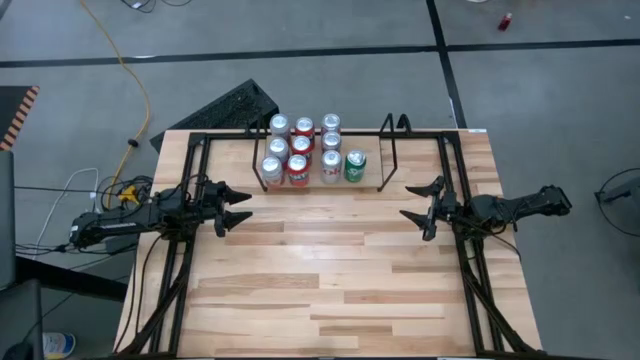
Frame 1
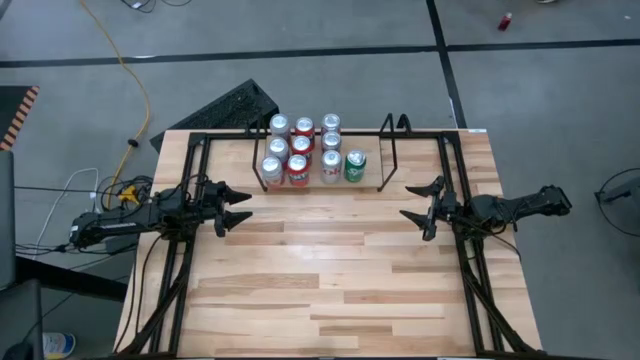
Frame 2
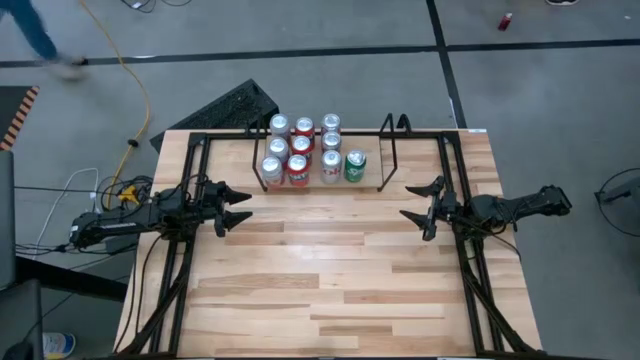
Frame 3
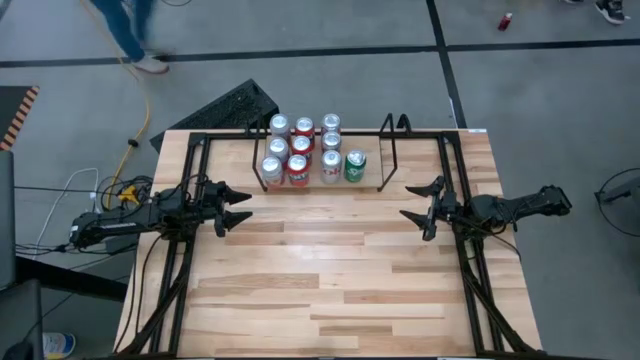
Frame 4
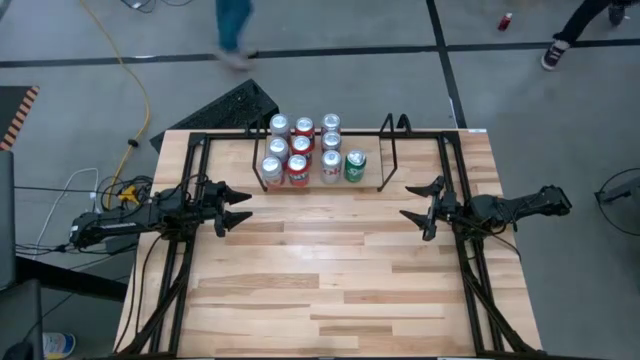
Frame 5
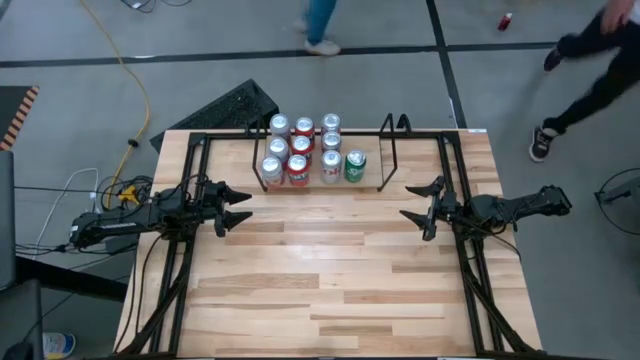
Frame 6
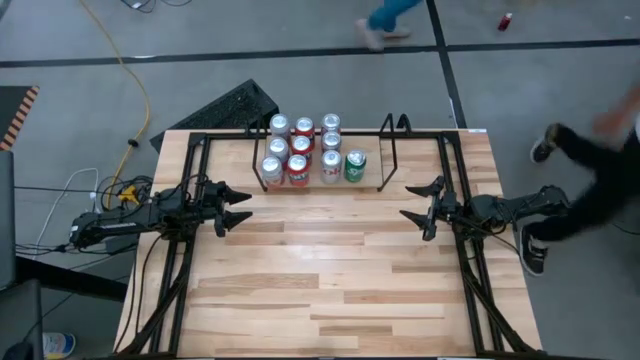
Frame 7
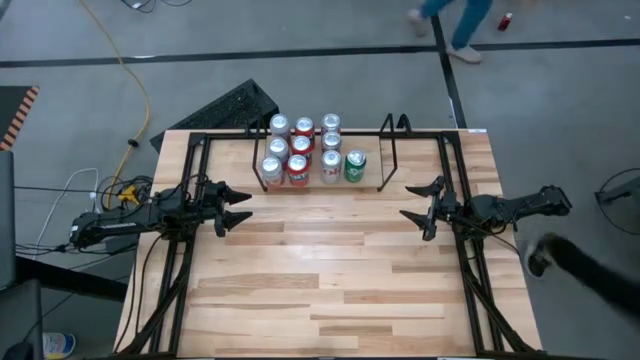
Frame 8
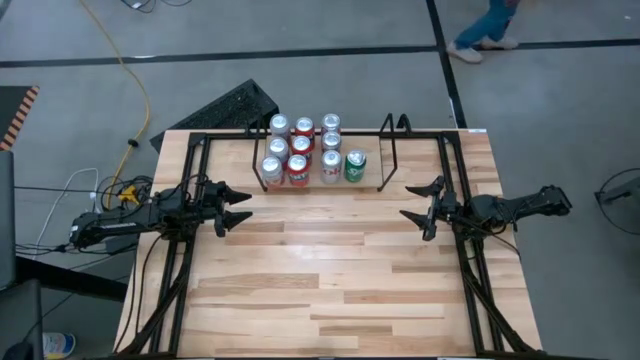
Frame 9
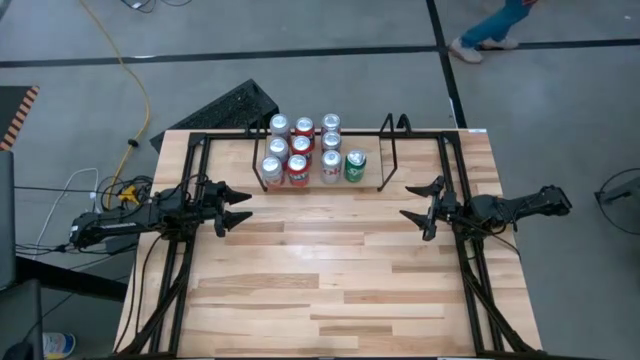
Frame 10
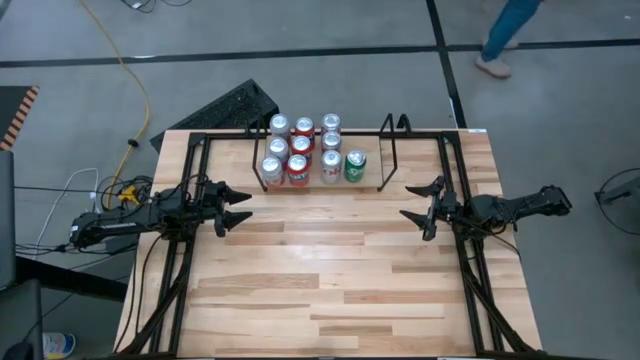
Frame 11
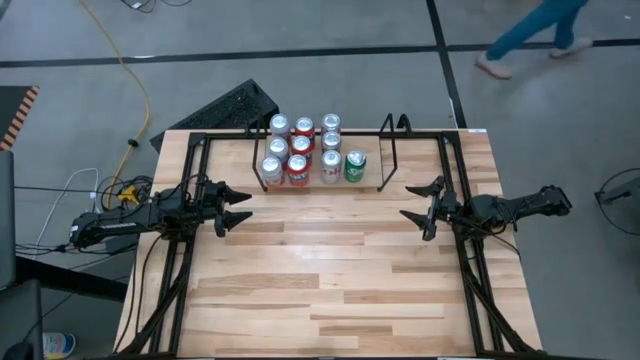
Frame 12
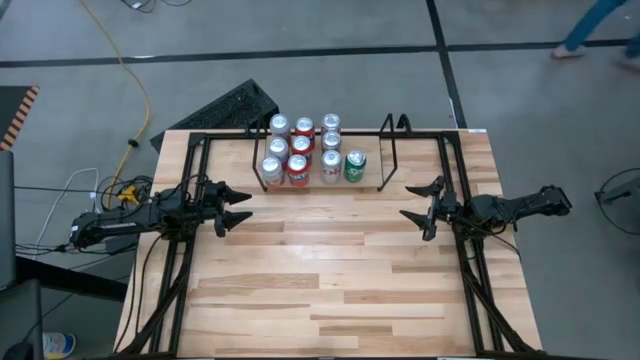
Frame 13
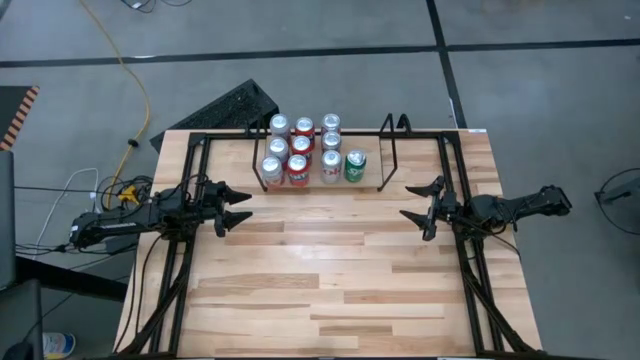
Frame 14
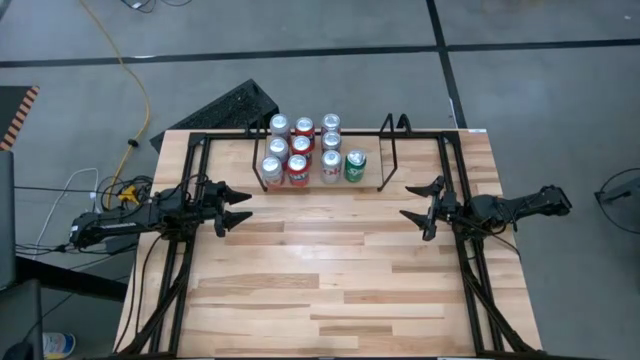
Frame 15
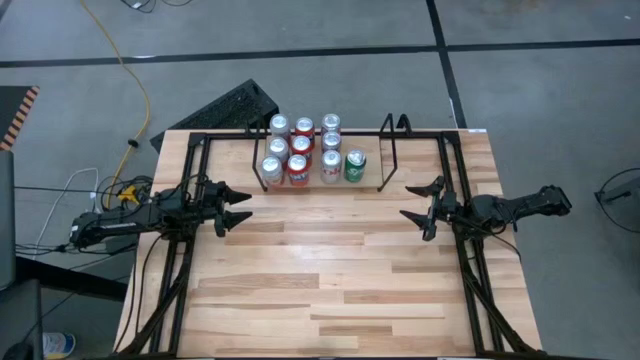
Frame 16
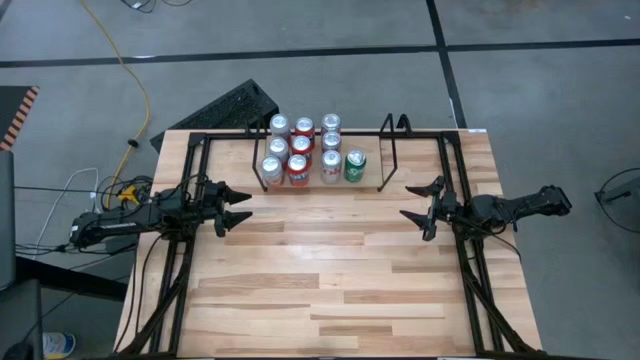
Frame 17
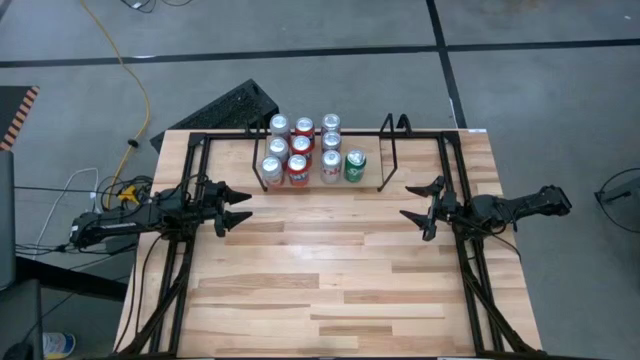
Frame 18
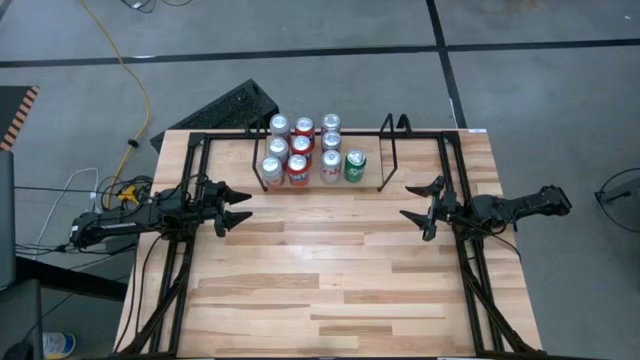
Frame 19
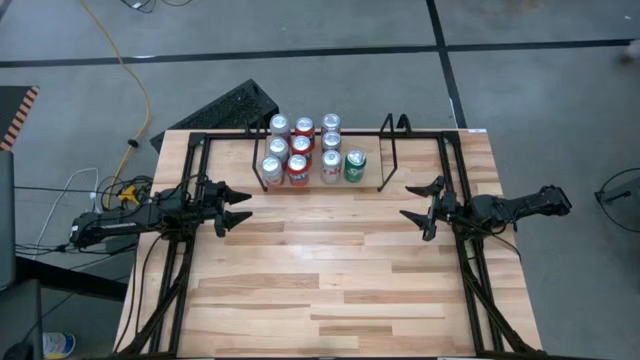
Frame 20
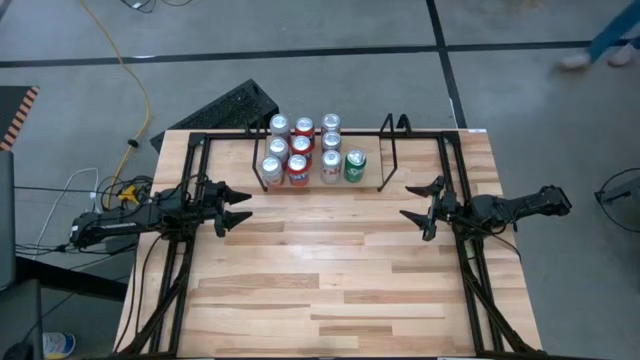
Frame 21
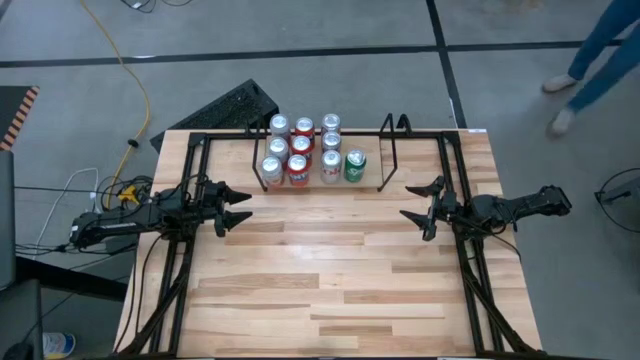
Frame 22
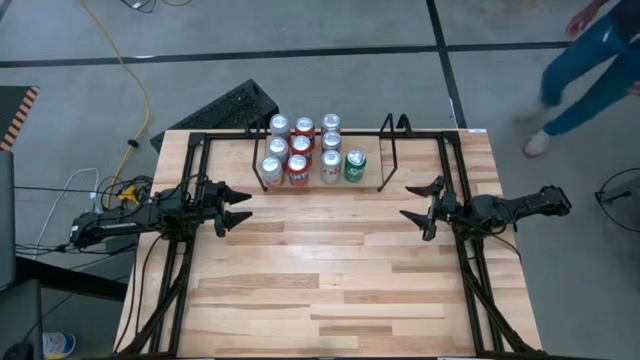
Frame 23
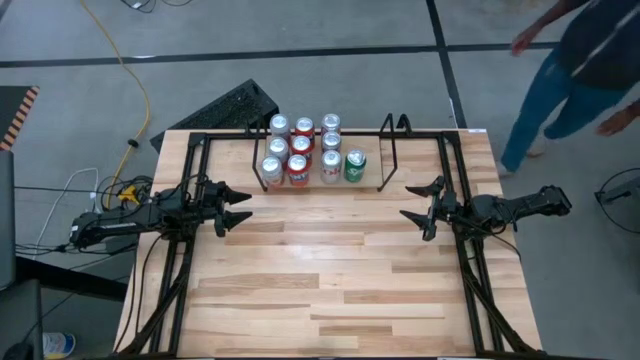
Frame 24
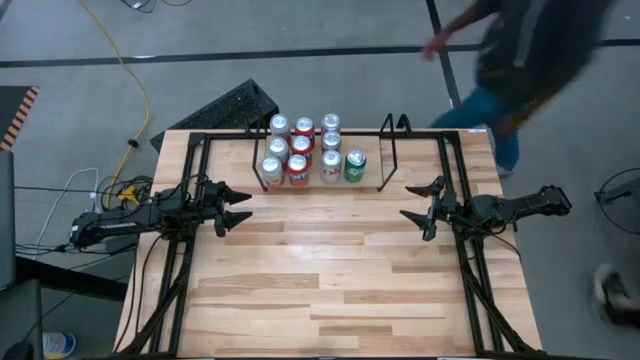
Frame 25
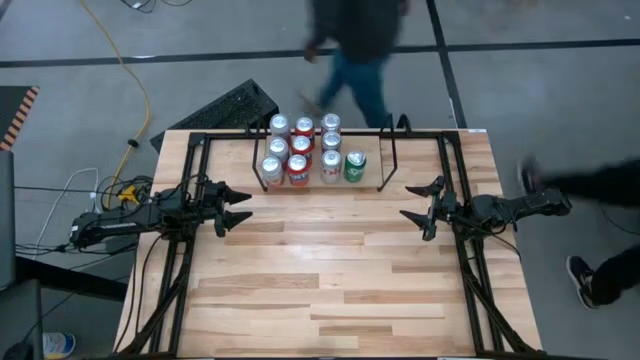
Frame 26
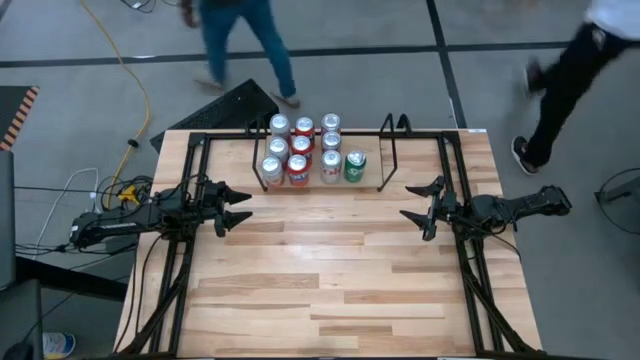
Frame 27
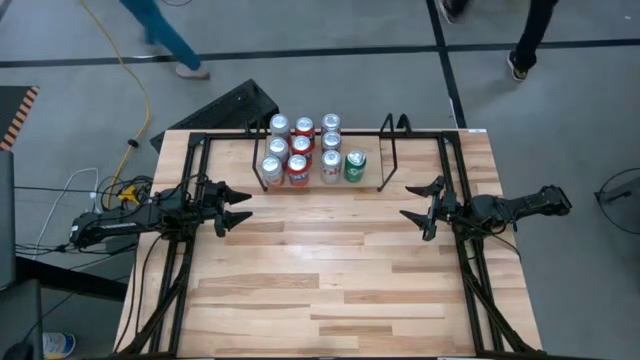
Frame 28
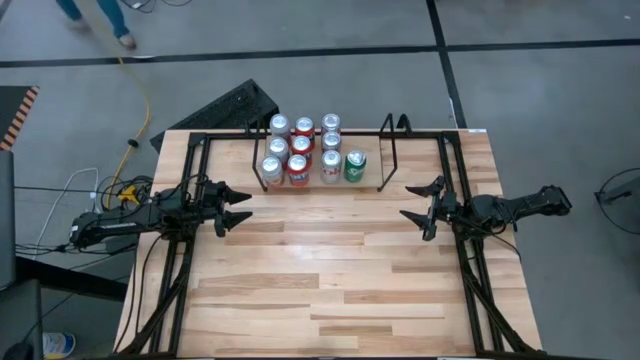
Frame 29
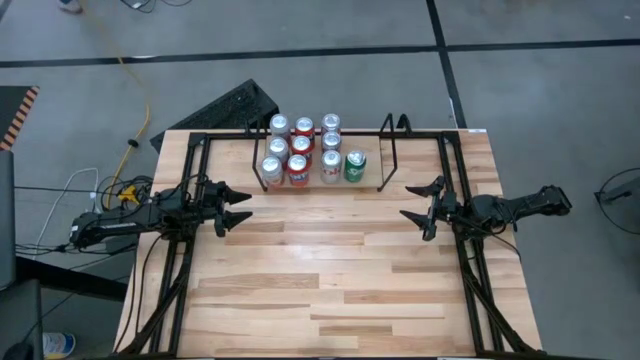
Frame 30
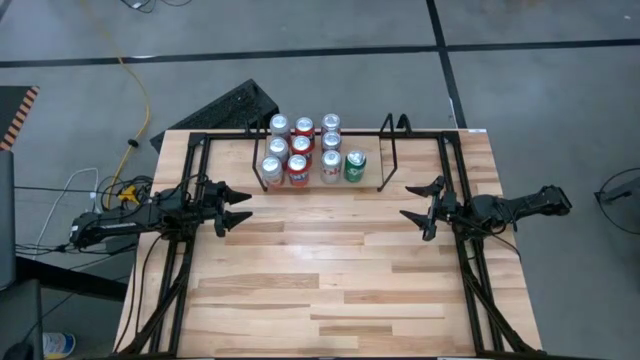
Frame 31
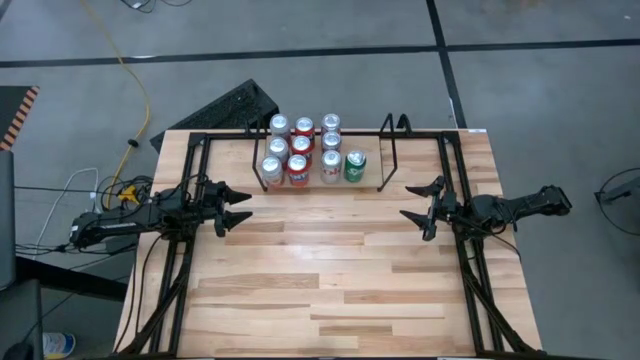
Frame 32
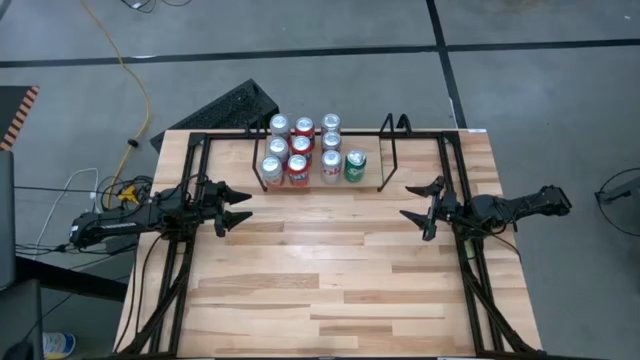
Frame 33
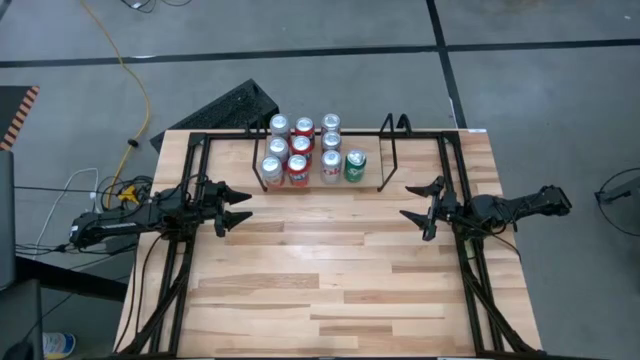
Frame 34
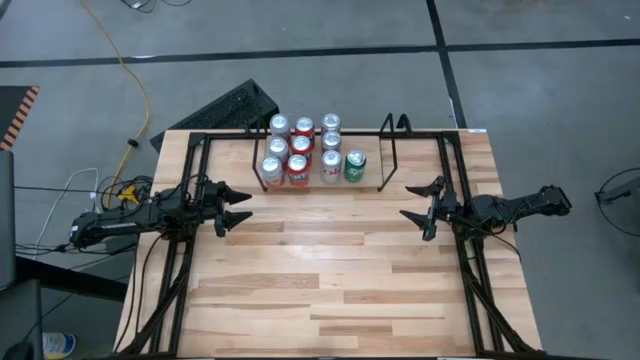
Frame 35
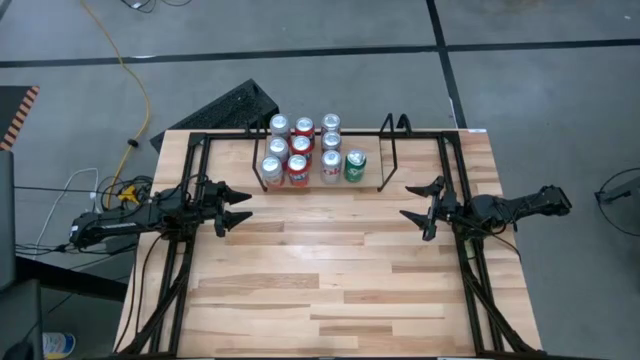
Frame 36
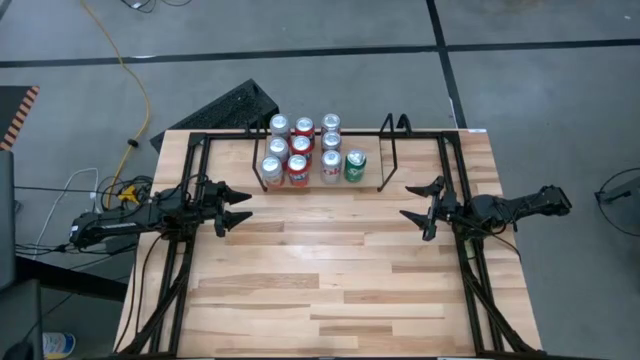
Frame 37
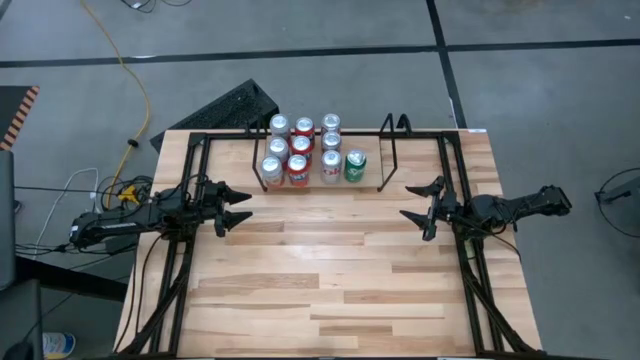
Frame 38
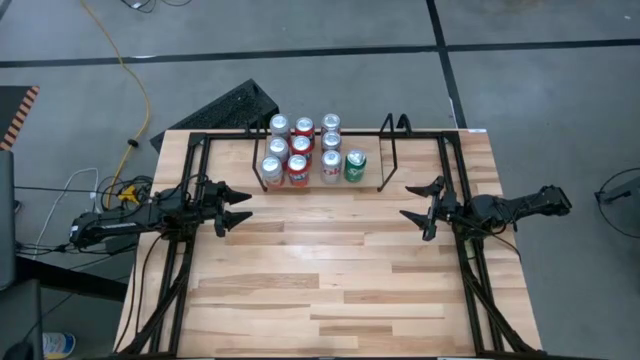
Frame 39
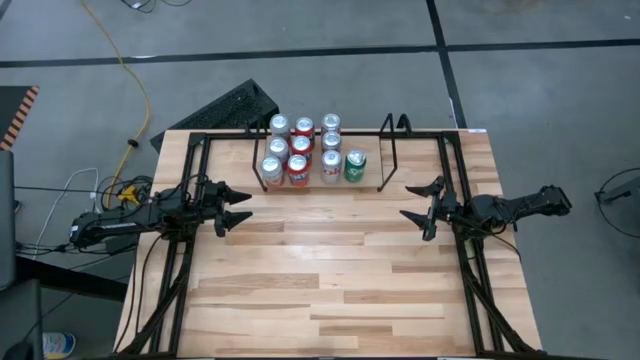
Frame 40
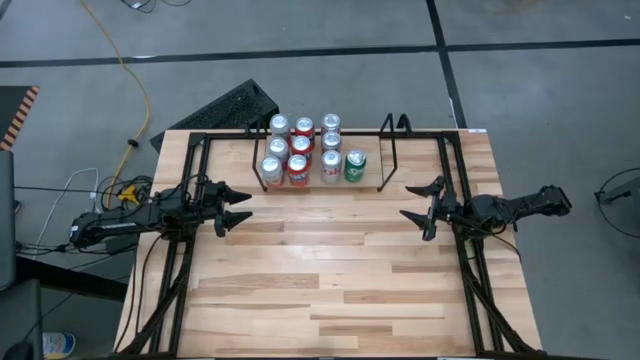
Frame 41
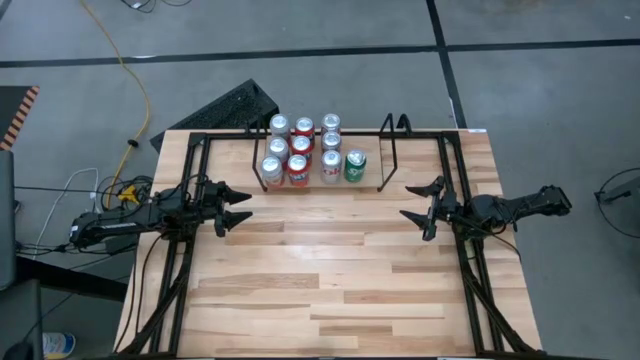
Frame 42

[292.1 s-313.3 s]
Task: Place canned beverage on shelf
Return to Home Position
